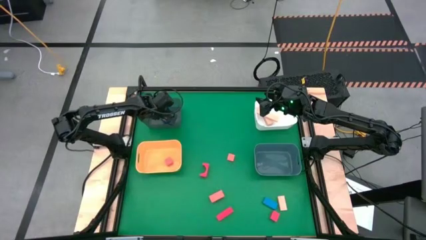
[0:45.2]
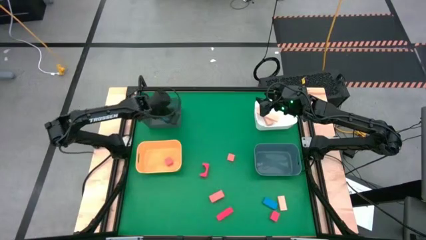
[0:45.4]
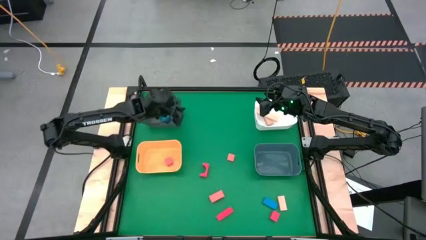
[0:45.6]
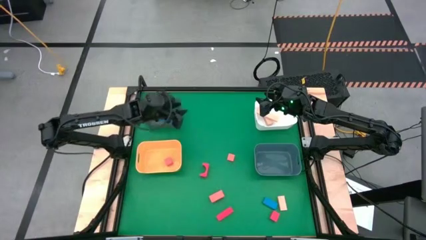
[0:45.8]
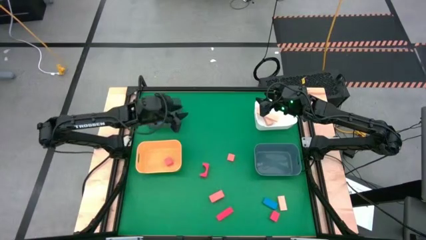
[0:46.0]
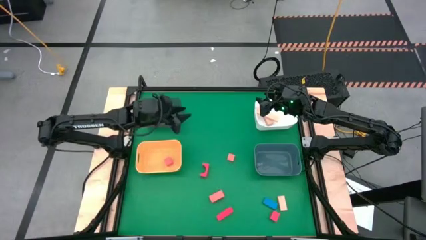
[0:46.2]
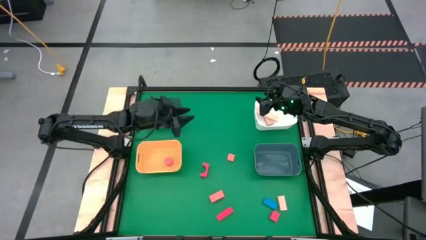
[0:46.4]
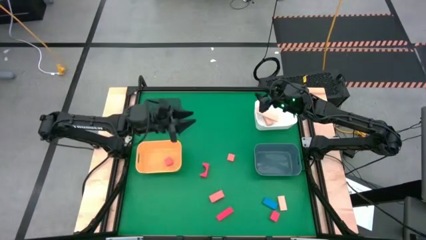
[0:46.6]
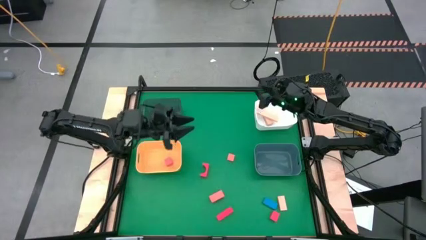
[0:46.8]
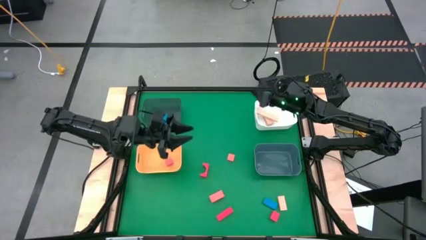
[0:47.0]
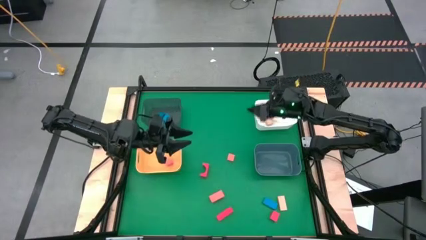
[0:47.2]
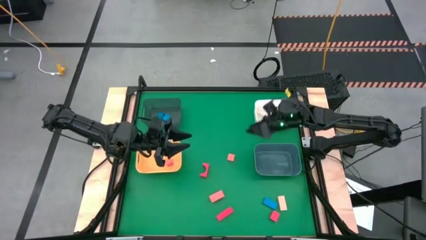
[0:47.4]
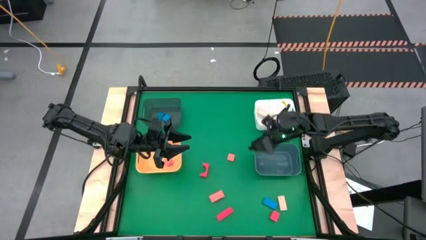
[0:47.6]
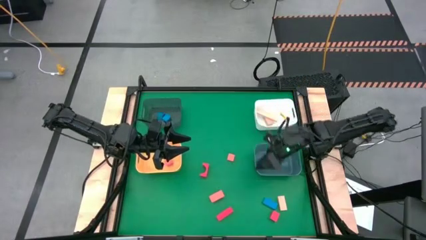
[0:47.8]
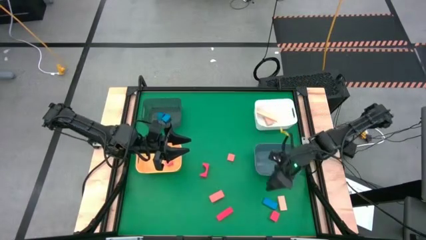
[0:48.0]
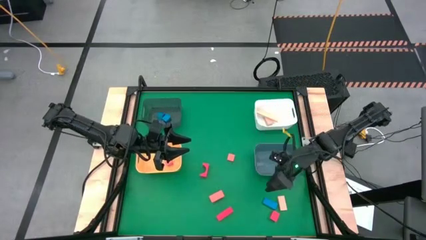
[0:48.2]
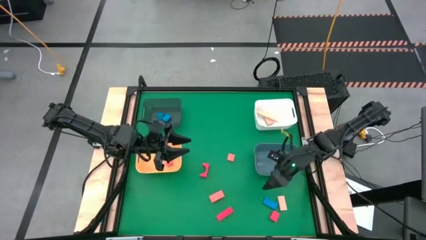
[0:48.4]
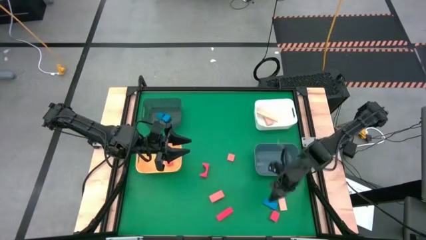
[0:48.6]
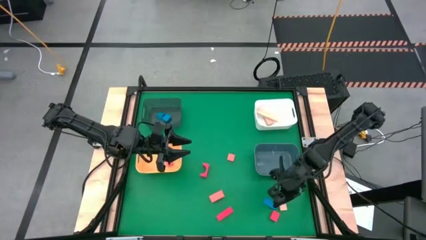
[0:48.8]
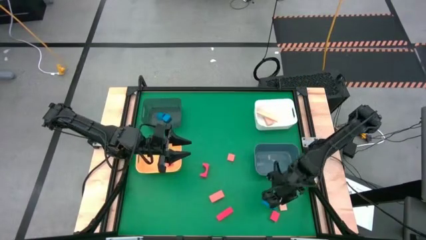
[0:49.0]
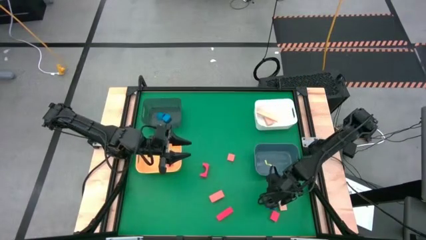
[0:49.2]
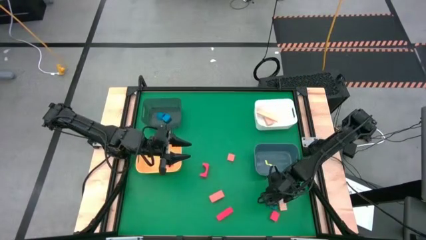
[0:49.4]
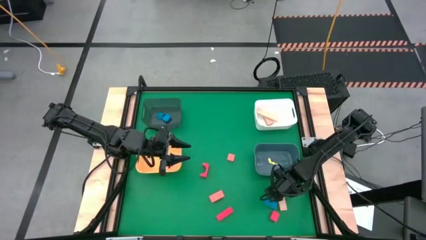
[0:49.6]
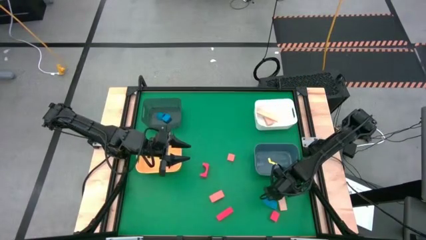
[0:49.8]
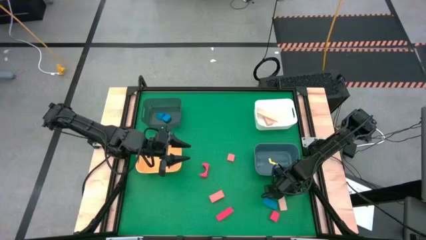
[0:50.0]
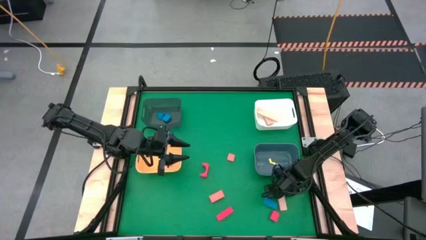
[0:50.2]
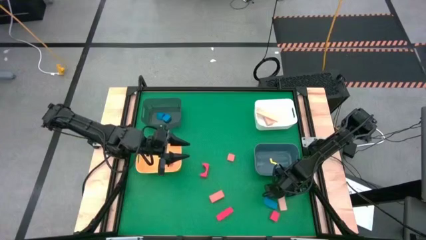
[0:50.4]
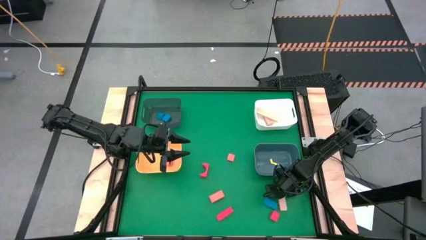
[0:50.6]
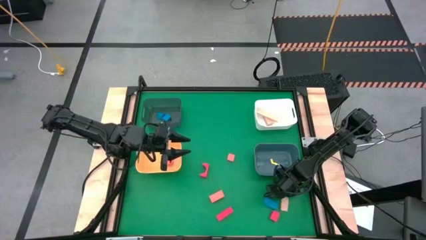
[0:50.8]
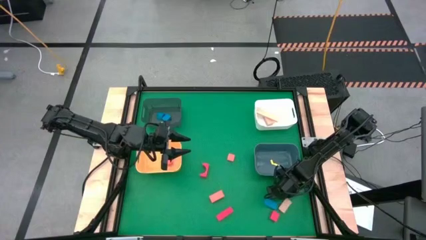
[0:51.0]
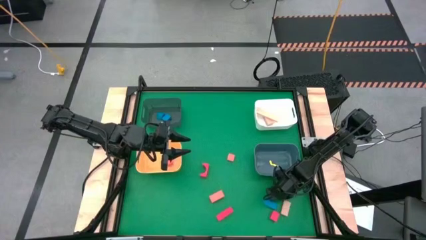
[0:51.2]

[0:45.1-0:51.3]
Task: Sort & place blocks by color
Put the light brown block into the white bin

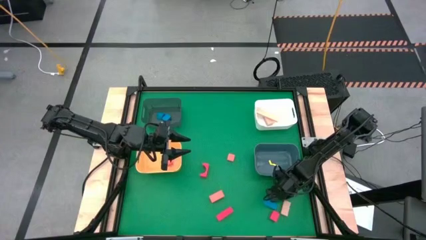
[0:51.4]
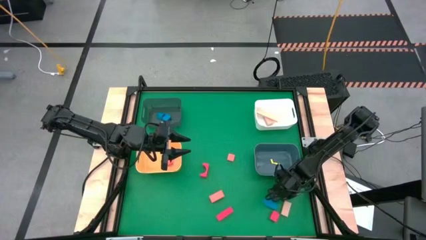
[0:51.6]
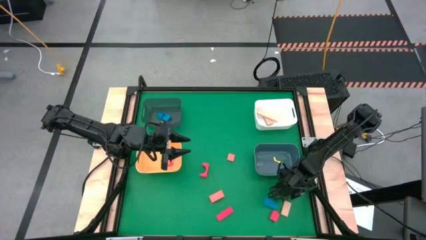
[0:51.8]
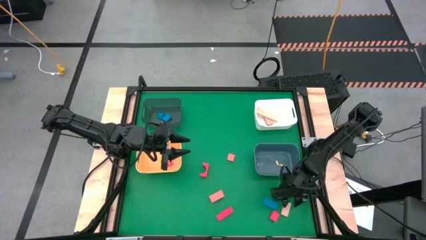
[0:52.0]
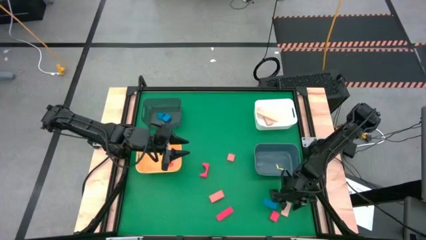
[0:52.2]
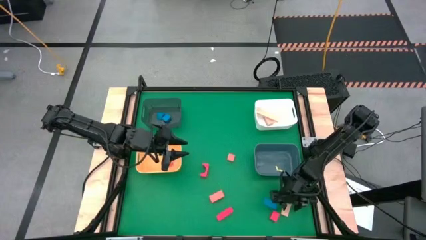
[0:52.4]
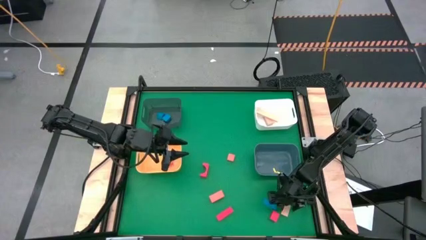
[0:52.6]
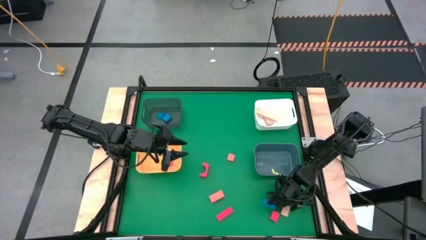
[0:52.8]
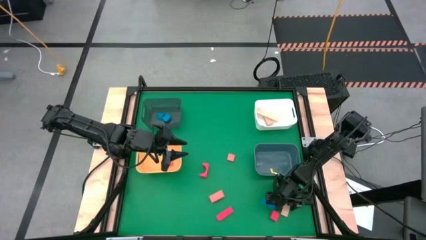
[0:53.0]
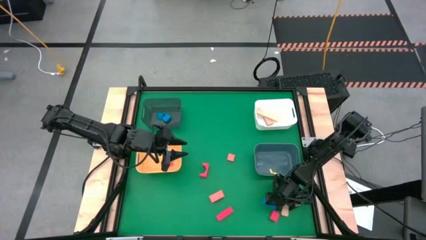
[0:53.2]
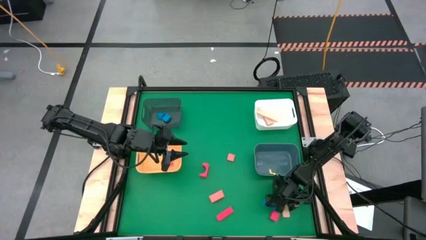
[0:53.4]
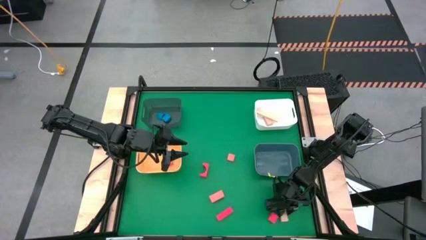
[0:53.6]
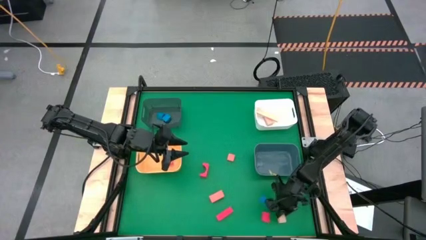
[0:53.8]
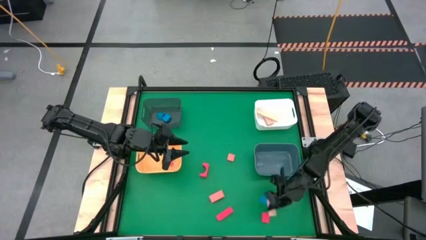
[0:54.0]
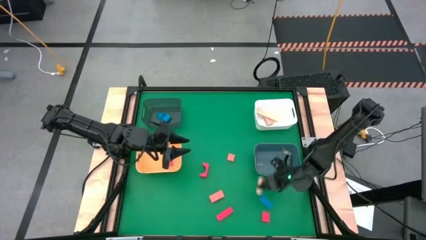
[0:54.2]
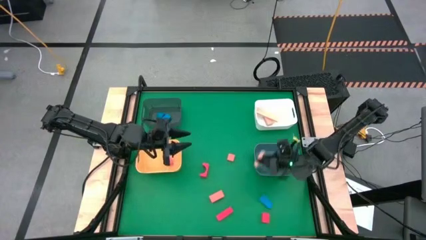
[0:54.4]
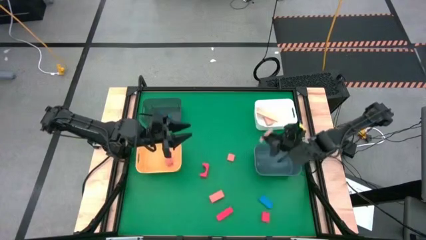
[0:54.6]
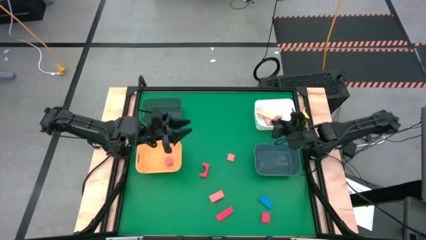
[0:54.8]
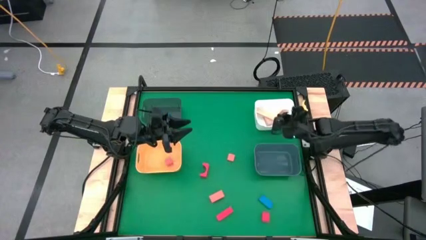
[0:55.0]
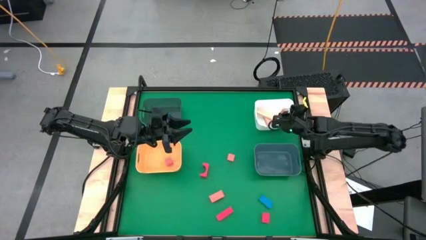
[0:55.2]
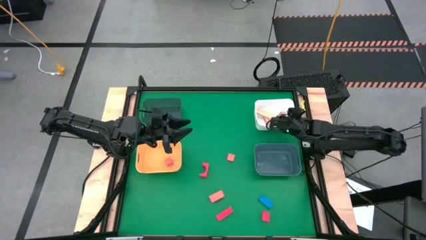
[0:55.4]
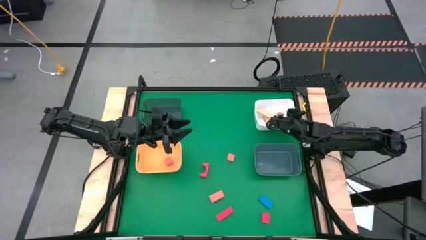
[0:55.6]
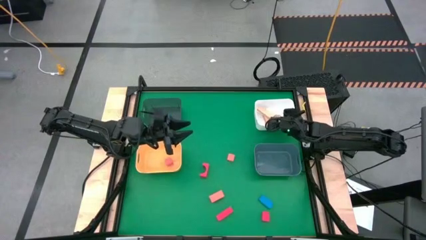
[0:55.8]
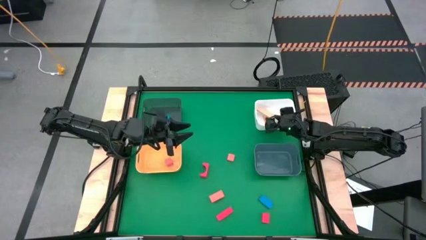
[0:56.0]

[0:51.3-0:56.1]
Put the light brown block into the white bin

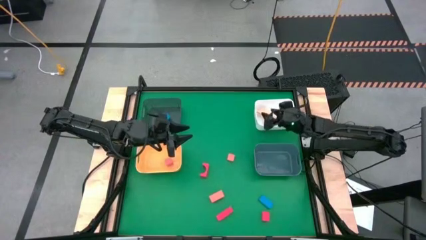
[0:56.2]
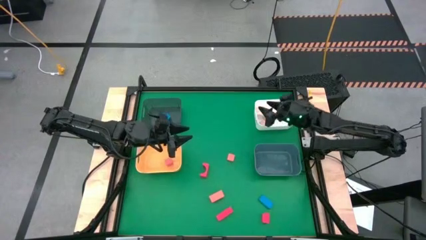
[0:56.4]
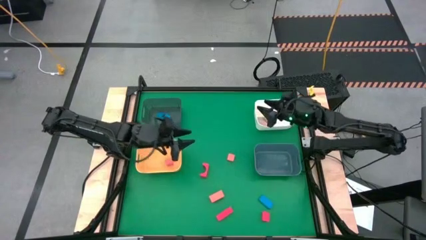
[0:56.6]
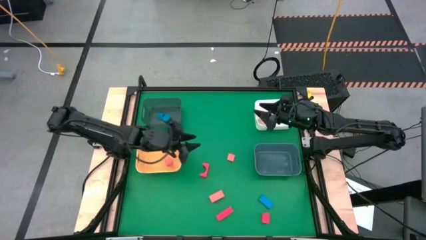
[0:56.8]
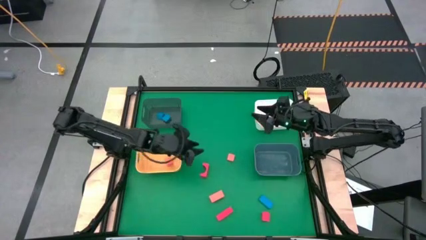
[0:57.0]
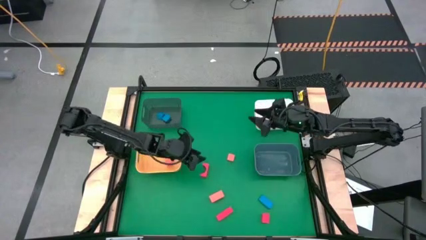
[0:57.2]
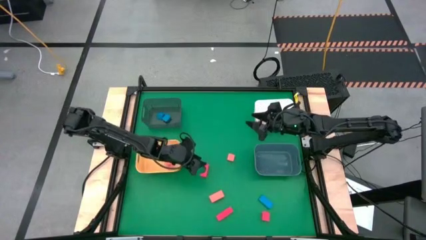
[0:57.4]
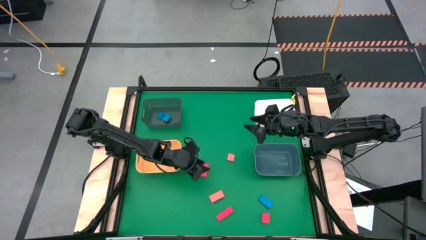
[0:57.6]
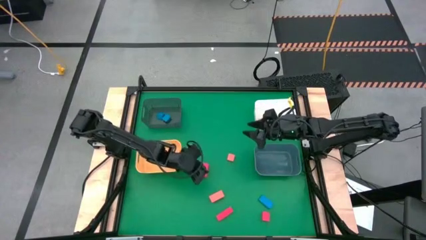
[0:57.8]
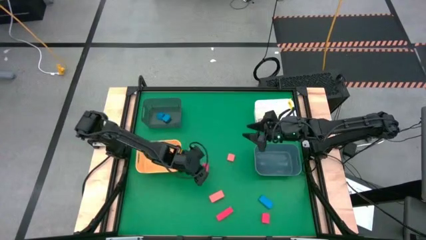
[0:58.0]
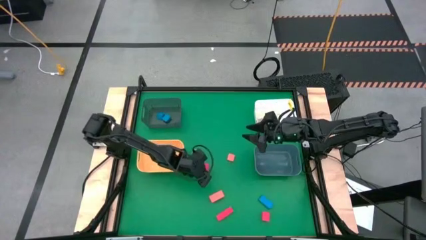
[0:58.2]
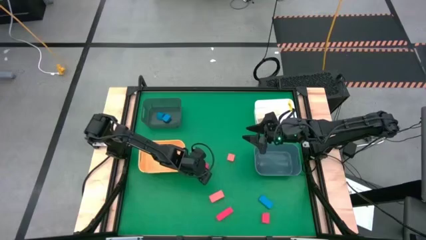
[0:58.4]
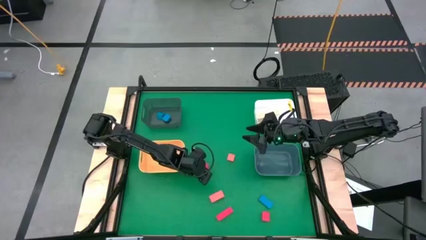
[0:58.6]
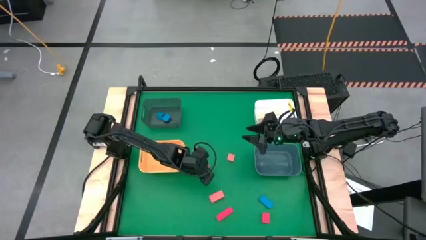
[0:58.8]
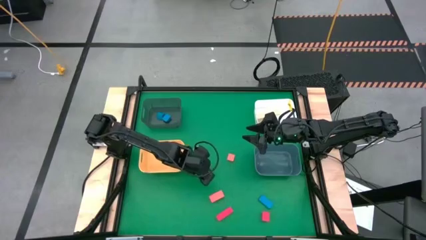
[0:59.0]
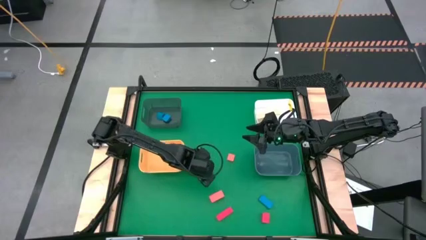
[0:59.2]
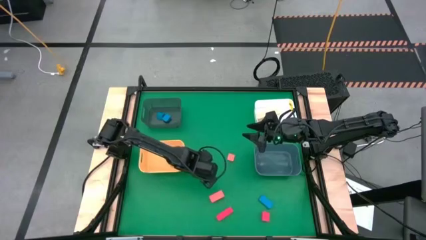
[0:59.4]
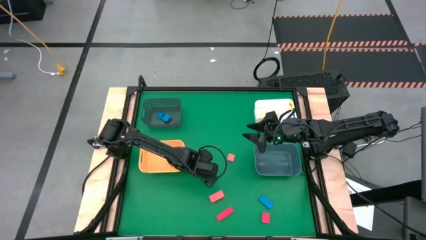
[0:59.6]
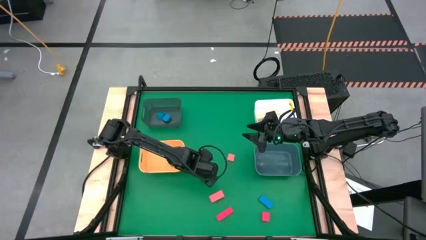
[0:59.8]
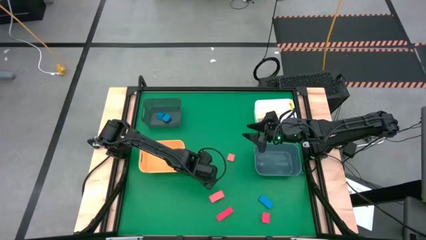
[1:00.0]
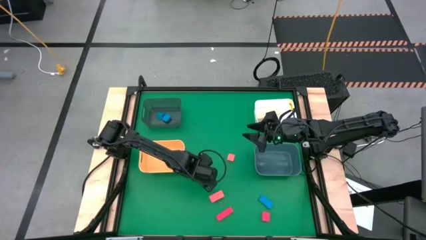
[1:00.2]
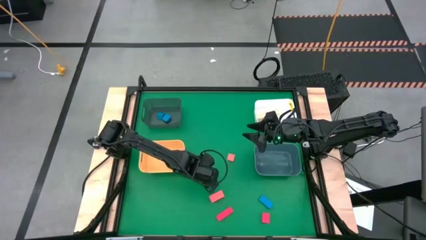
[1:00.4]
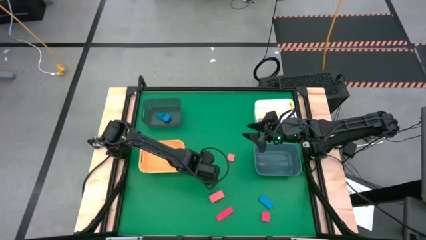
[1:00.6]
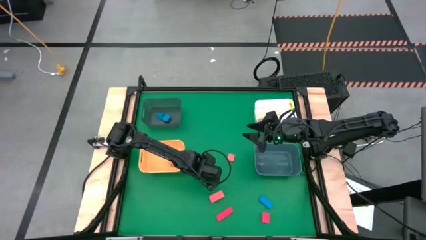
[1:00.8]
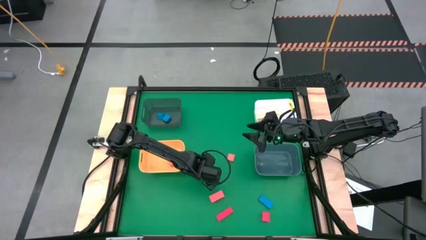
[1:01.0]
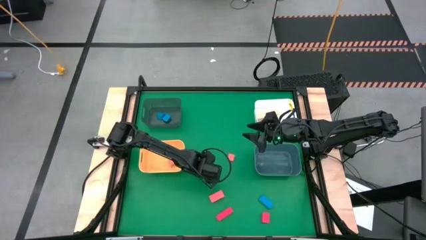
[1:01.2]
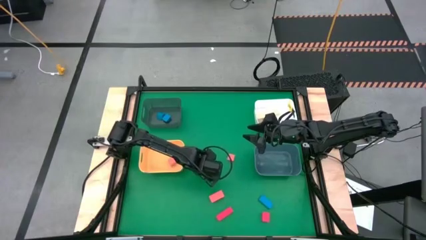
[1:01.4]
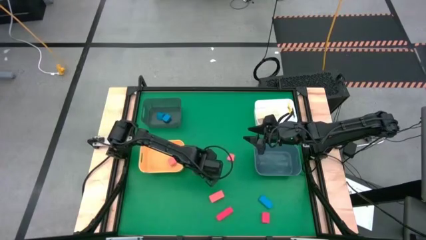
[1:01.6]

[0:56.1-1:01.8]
Put the top left red block into the green bin
